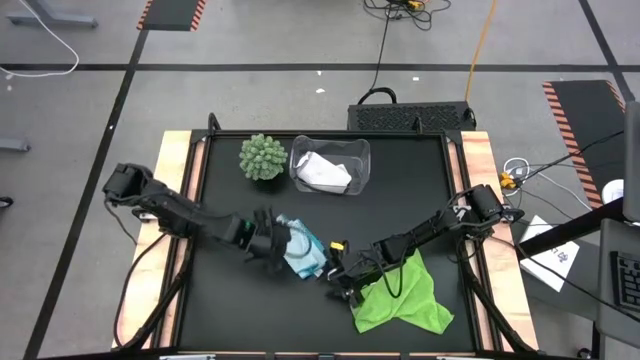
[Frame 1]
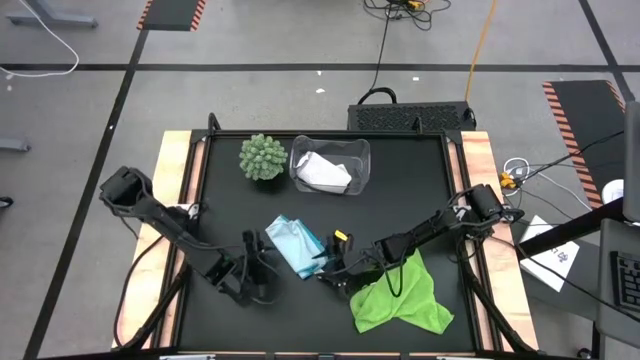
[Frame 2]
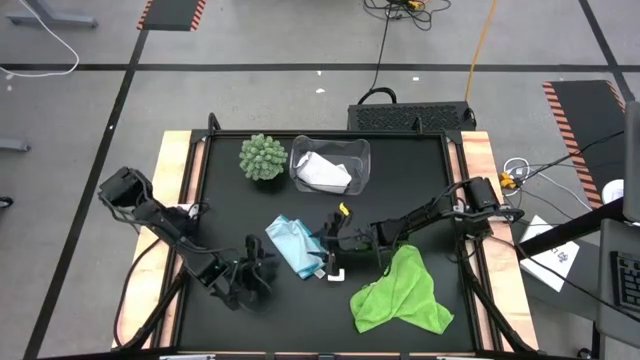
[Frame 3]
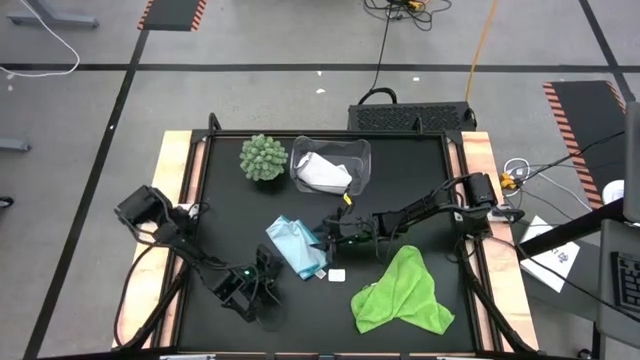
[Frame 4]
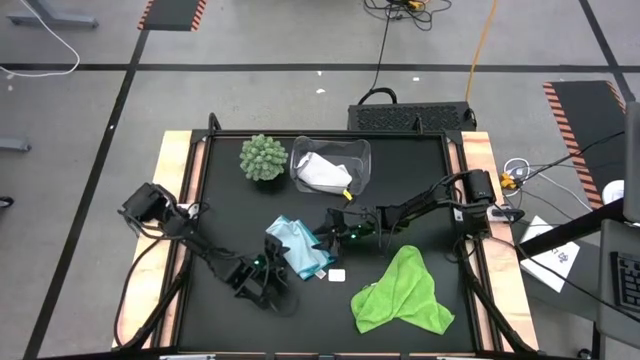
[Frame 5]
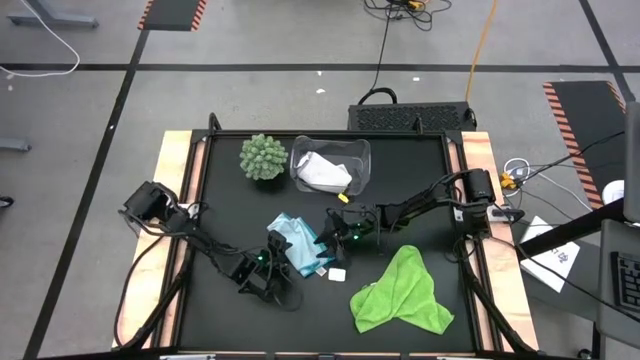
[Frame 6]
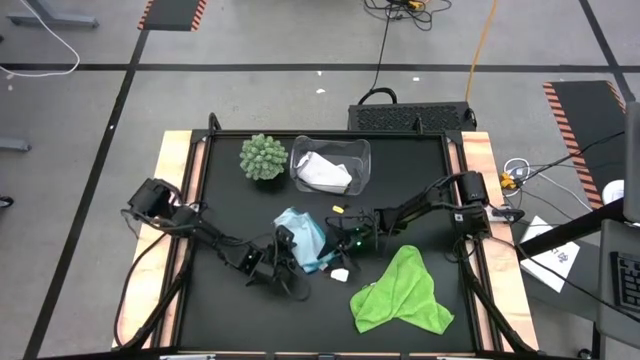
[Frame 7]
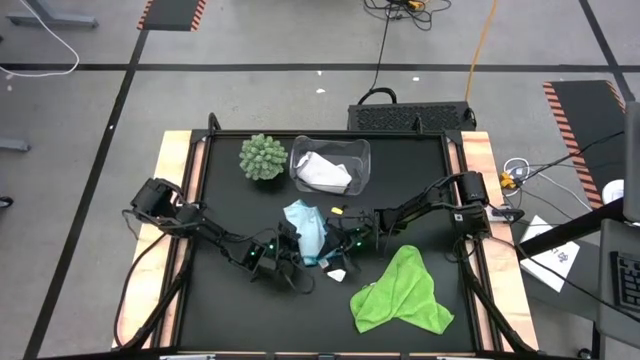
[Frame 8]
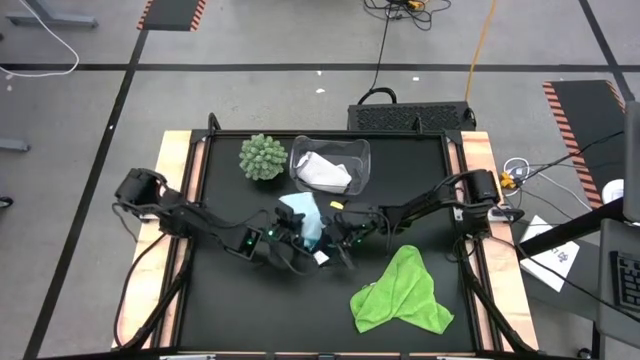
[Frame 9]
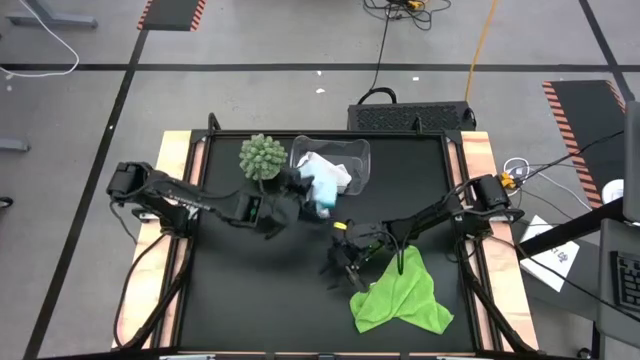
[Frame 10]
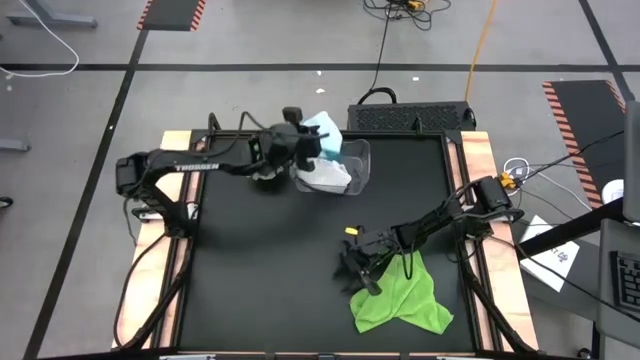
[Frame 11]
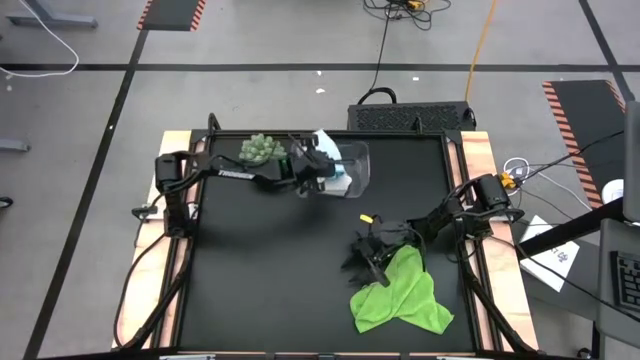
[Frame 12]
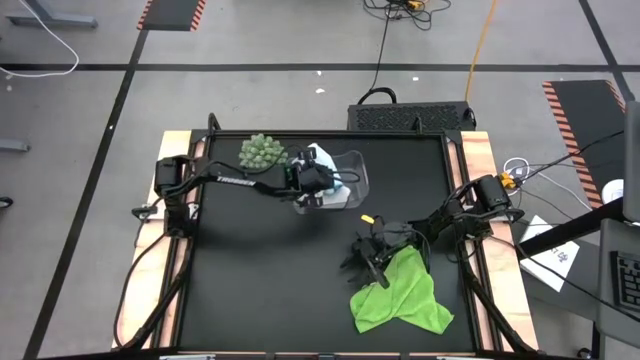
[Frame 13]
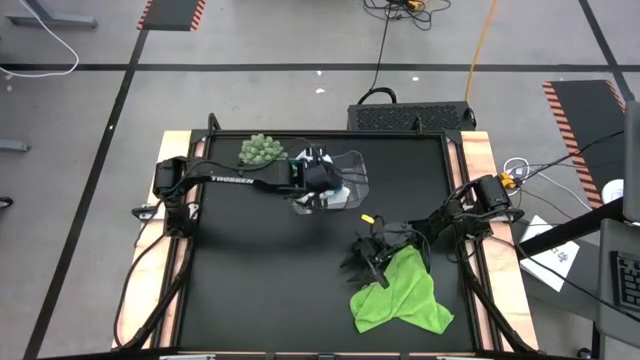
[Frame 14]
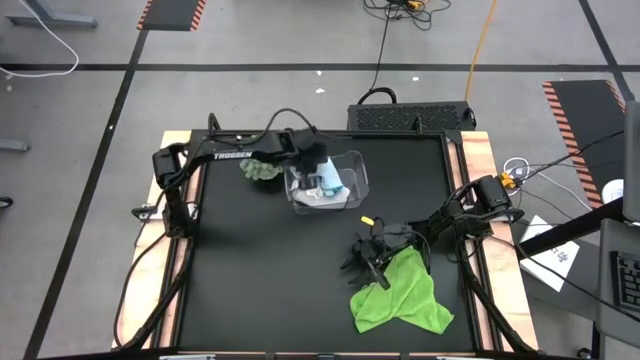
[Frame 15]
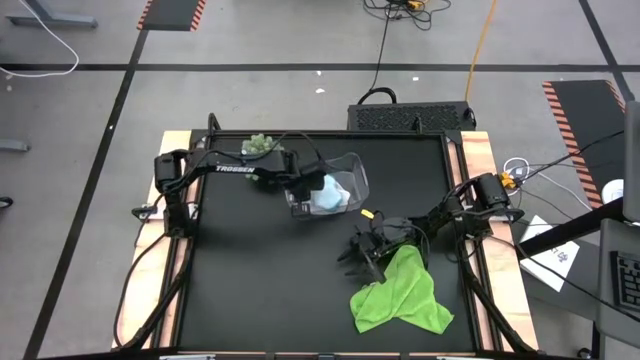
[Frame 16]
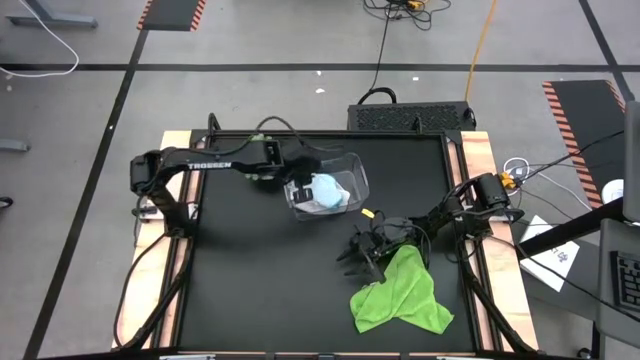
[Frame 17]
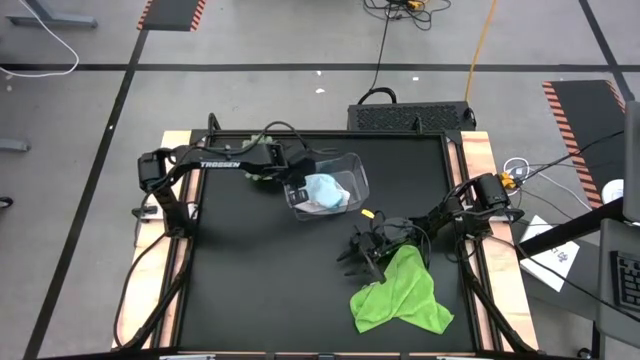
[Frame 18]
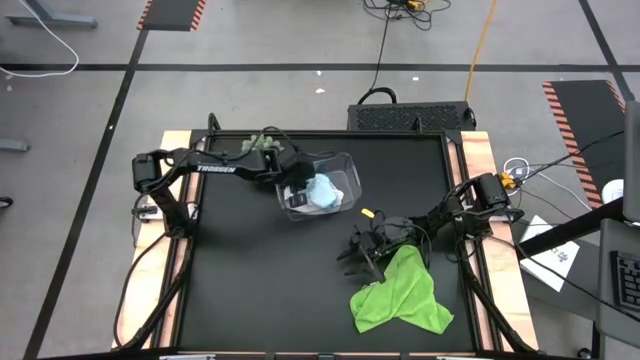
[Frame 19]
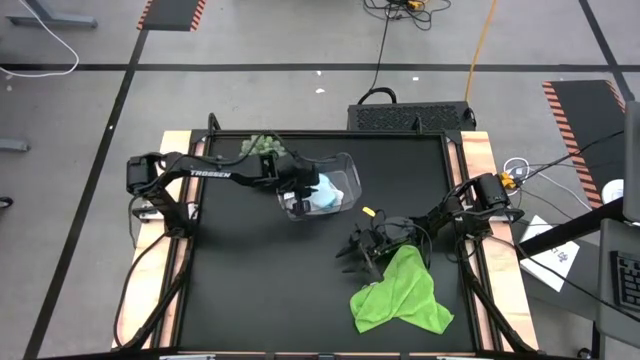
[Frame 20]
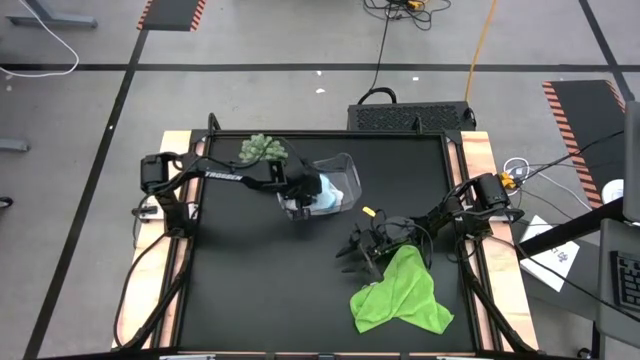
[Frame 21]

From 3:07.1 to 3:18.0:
Task: Fold microfiber towels
Put the folded blue towel into the transparent bin

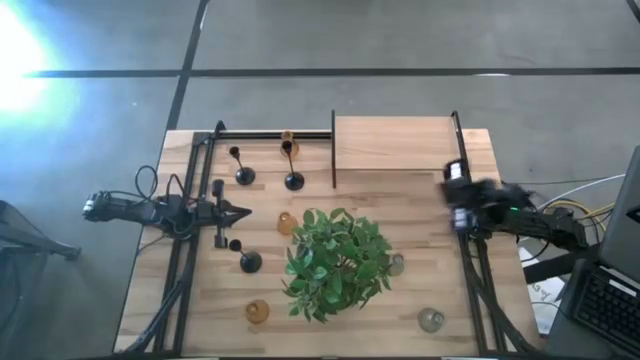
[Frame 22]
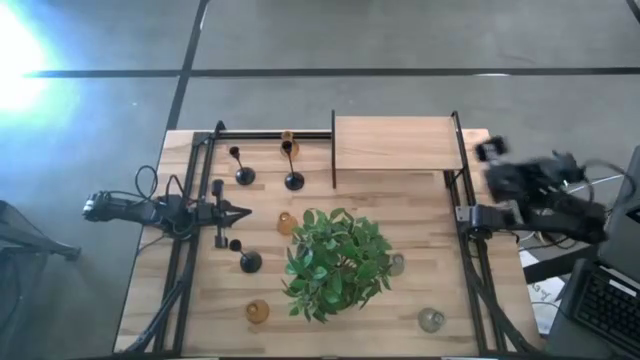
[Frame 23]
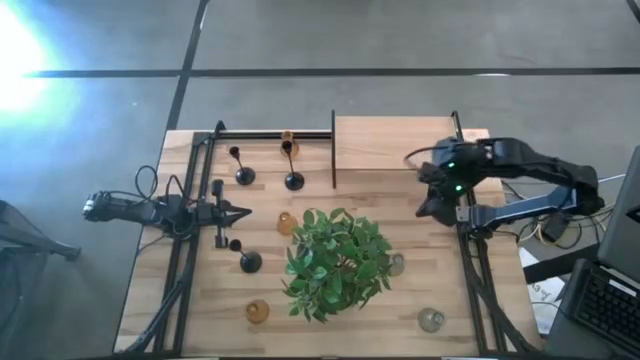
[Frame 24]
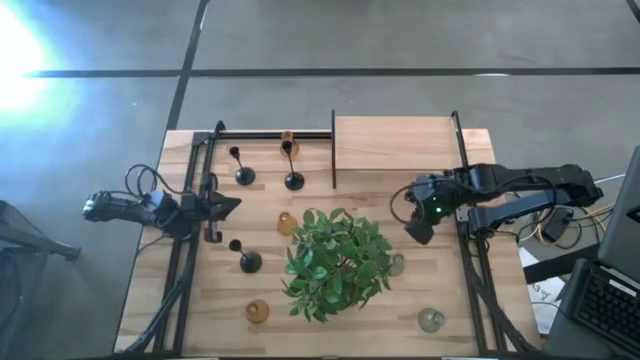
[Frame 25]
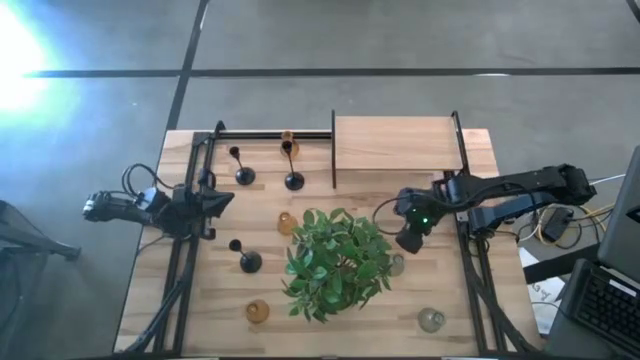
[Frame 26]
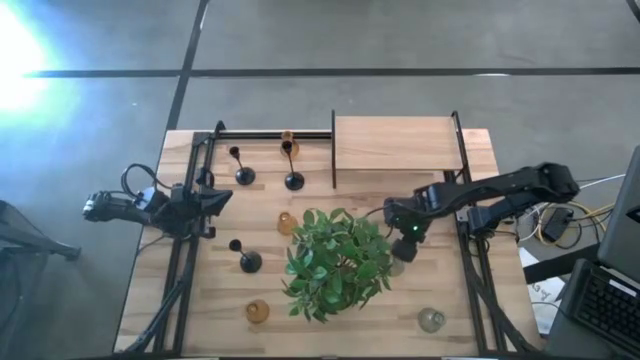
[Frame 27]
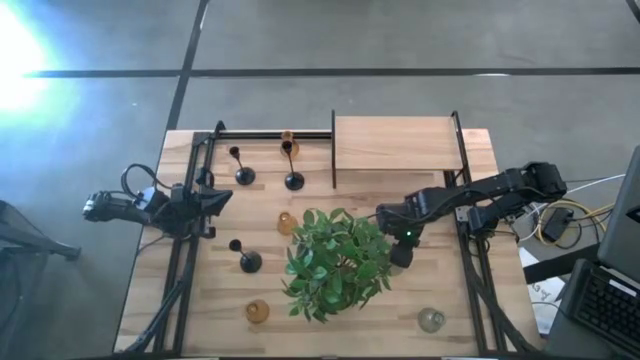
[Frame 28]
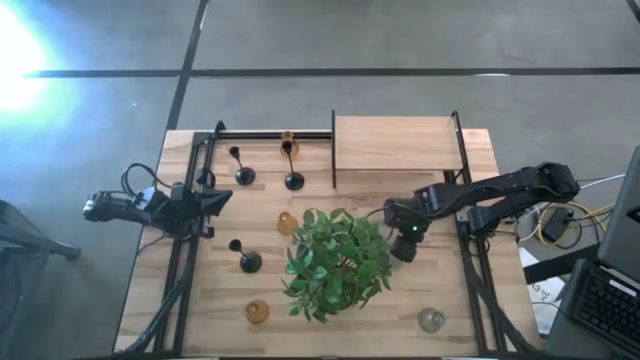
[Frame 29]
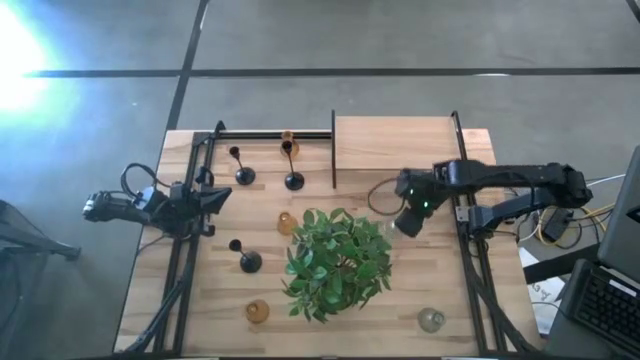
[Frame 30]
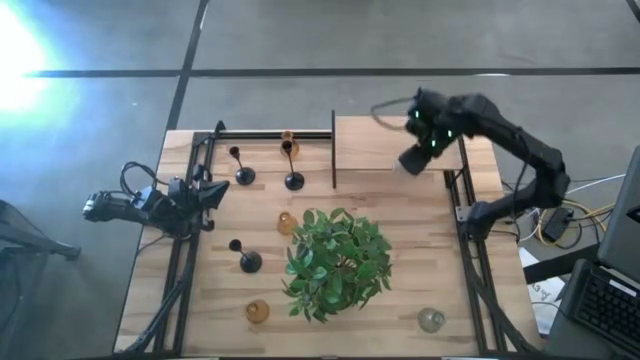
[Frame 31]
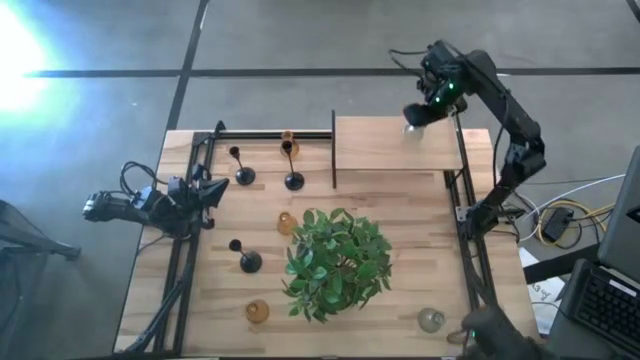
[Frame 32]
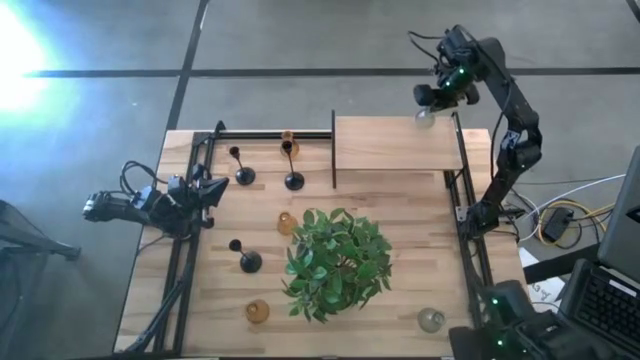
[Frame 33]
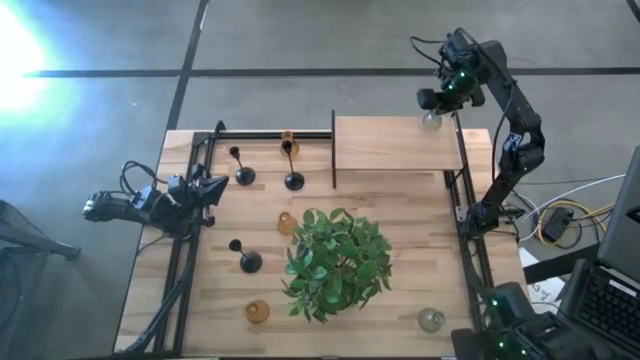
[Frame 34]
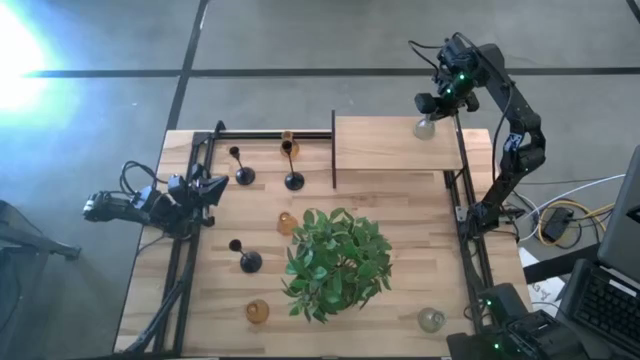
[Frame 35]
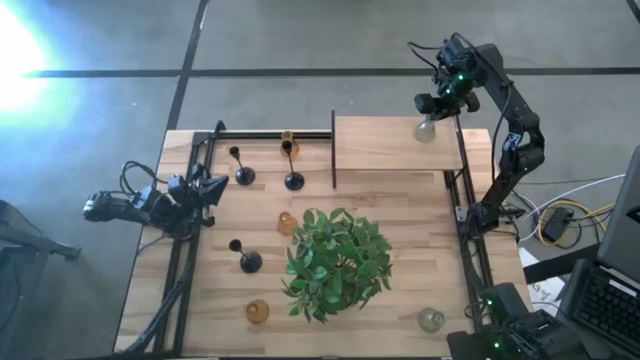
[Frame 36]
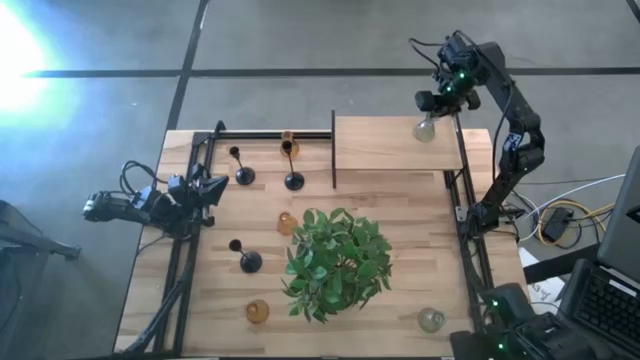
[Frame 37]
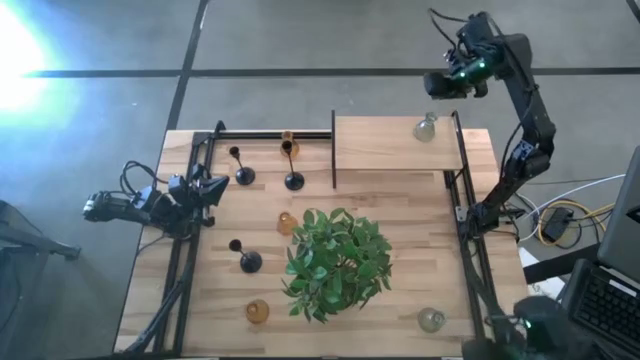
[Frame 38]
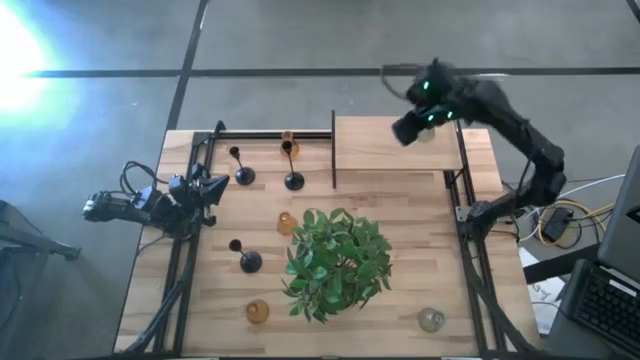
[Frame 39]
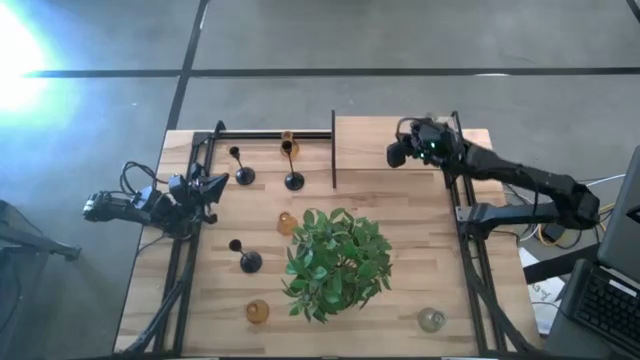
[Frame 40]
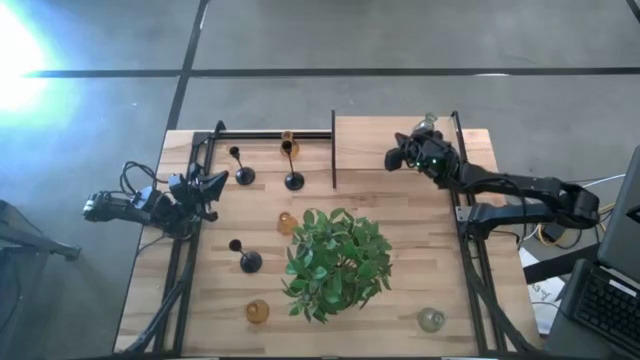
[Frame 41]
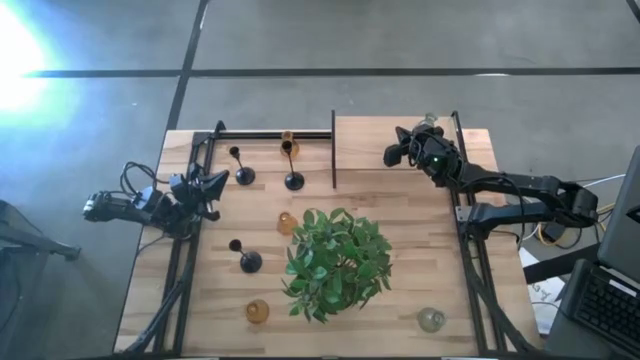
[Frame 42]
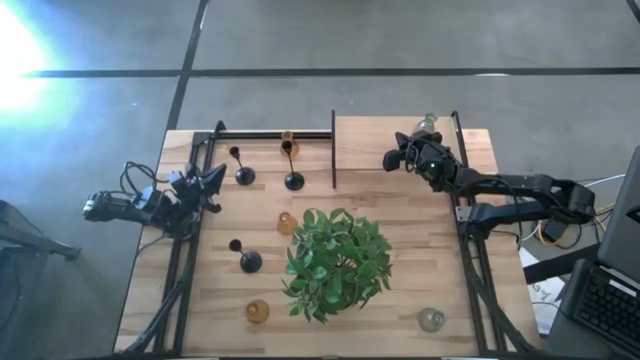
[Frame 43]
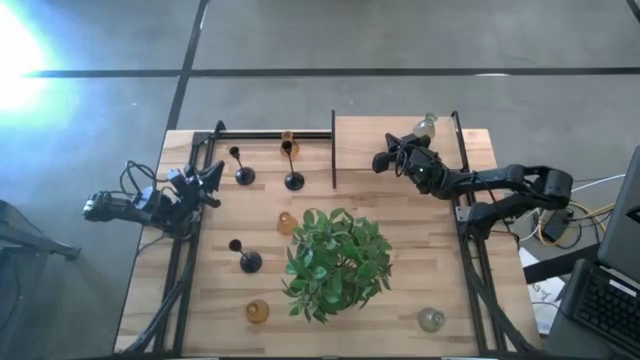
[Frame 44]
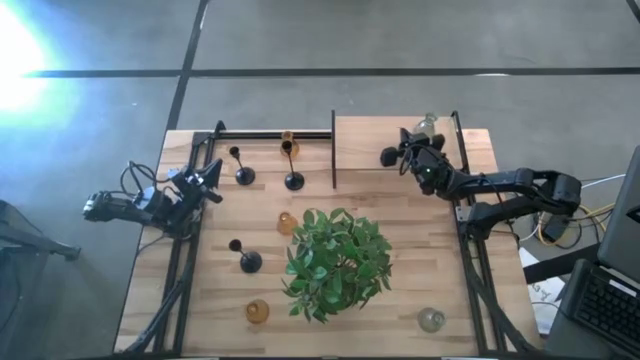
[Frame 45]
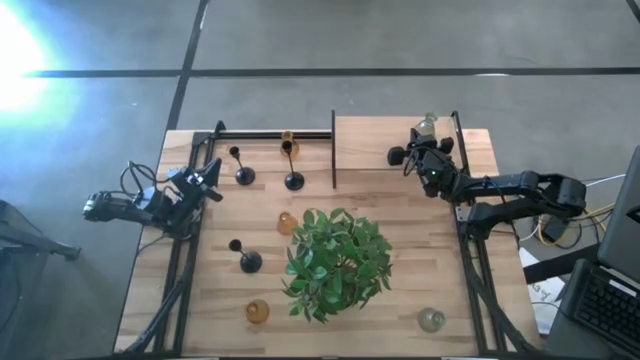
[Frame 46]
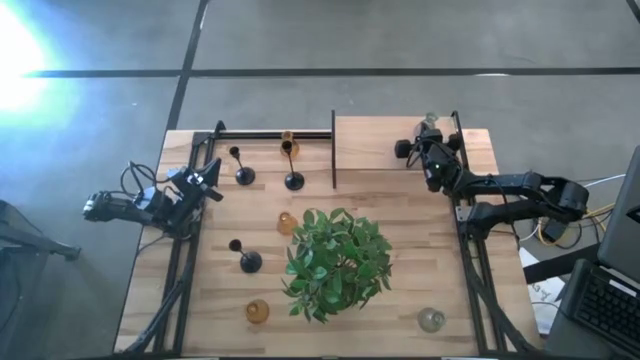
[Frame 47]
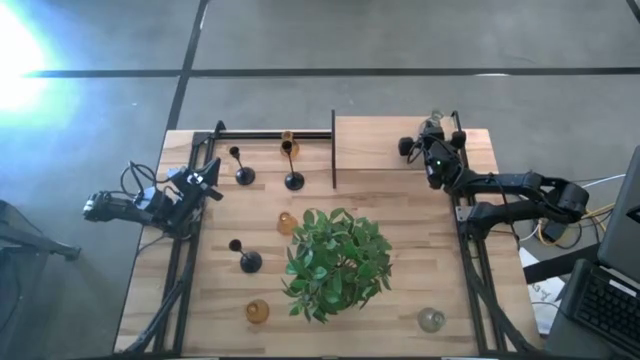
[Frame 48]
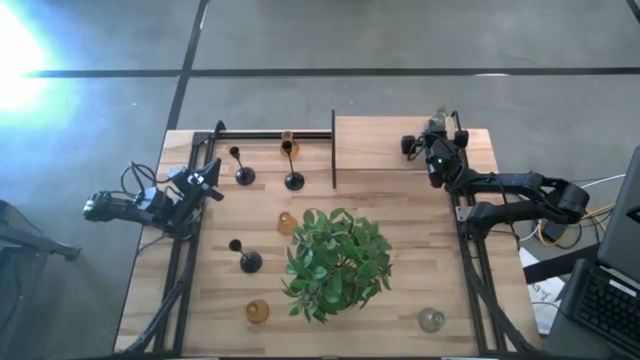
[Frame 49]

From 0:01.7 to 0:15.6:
Task: Pick & Place candle stick holders
Put the middle transparent glass candle holder on the shelf
